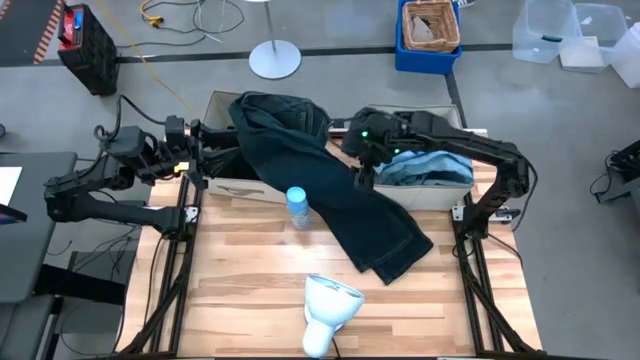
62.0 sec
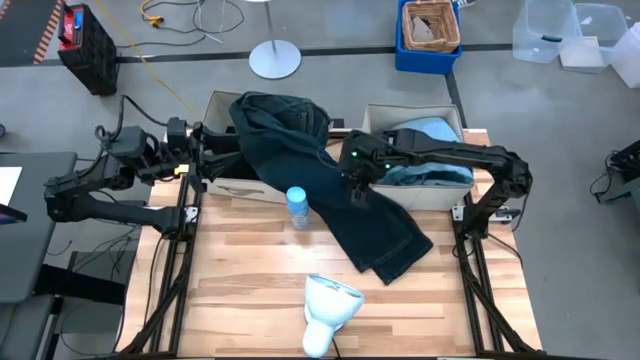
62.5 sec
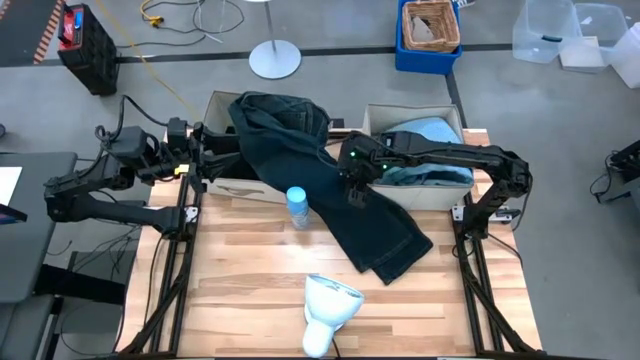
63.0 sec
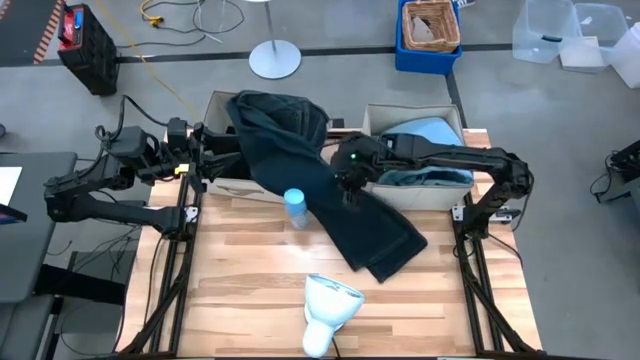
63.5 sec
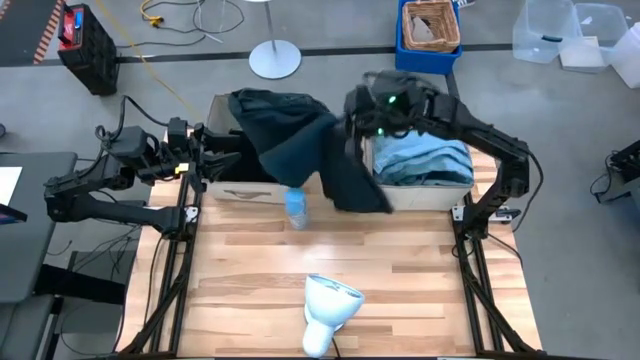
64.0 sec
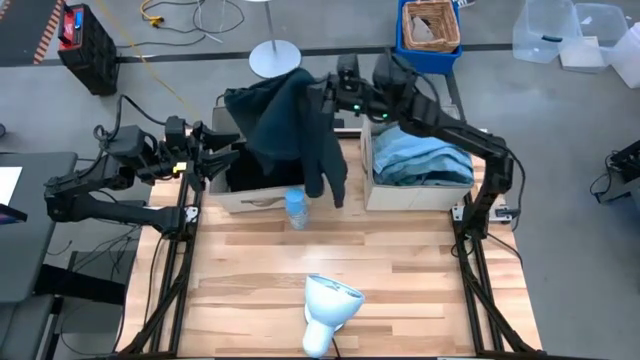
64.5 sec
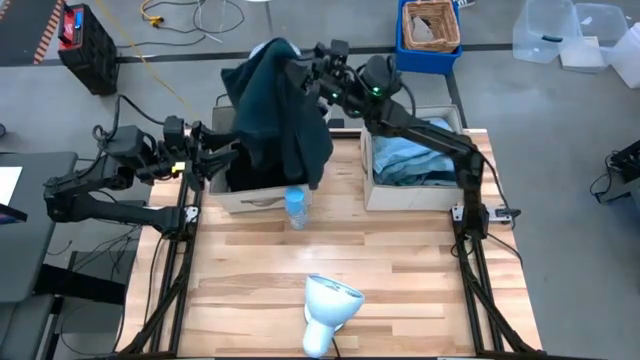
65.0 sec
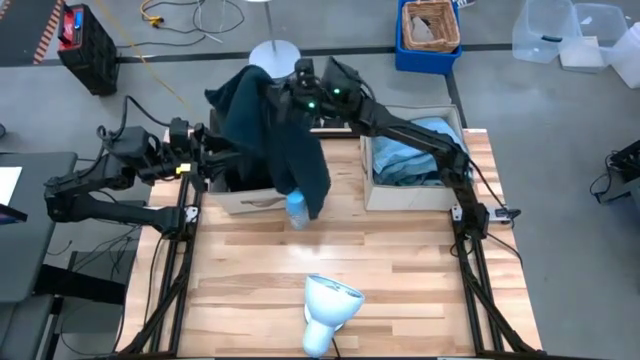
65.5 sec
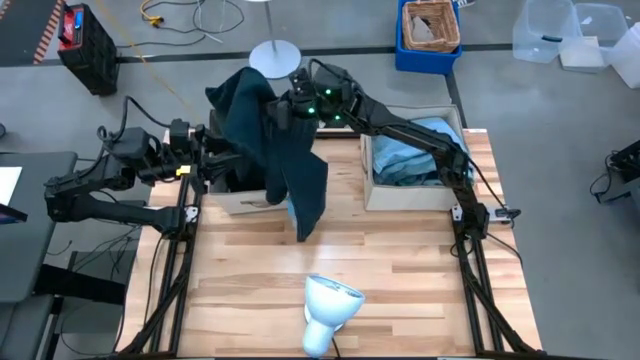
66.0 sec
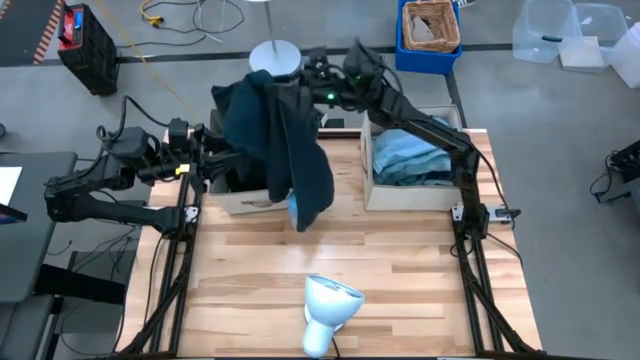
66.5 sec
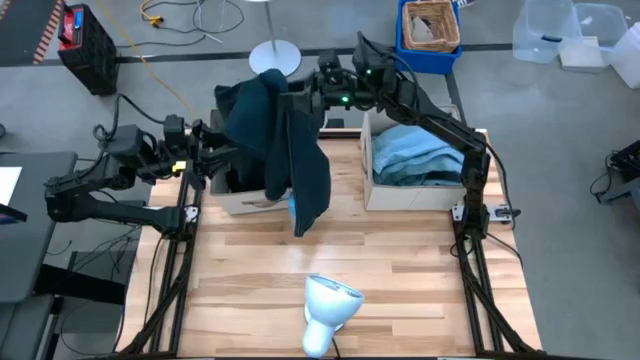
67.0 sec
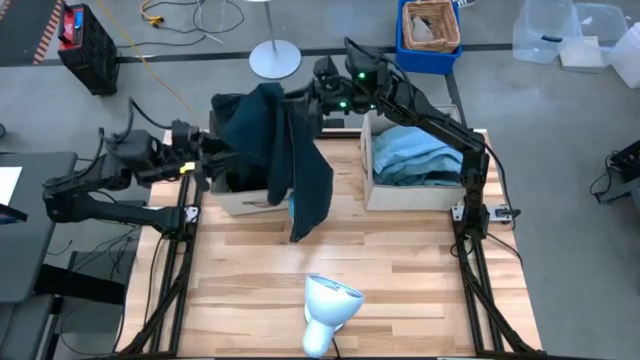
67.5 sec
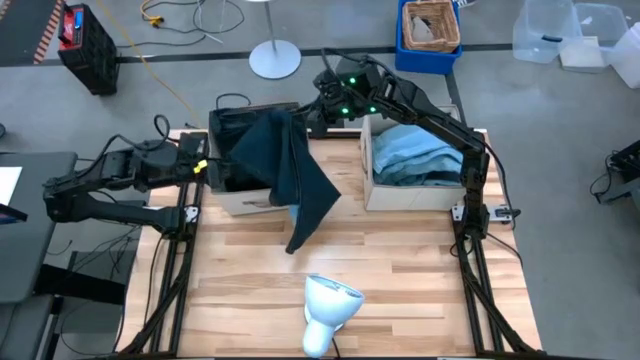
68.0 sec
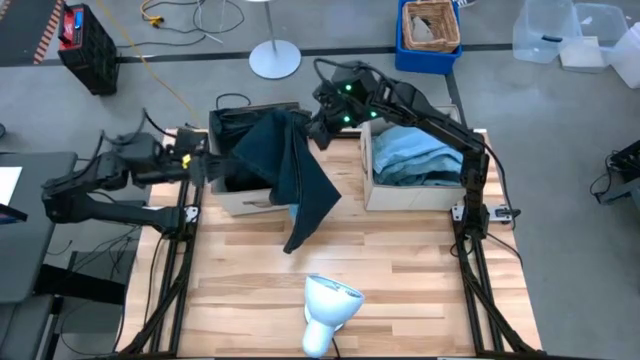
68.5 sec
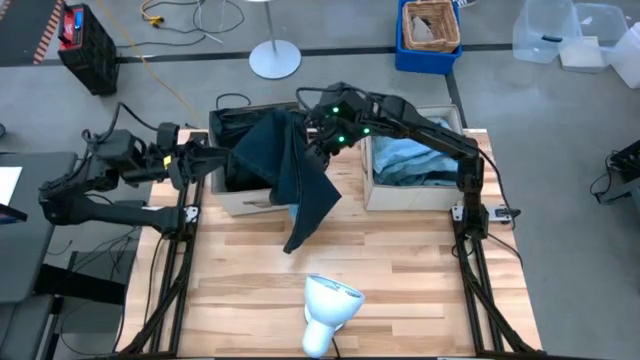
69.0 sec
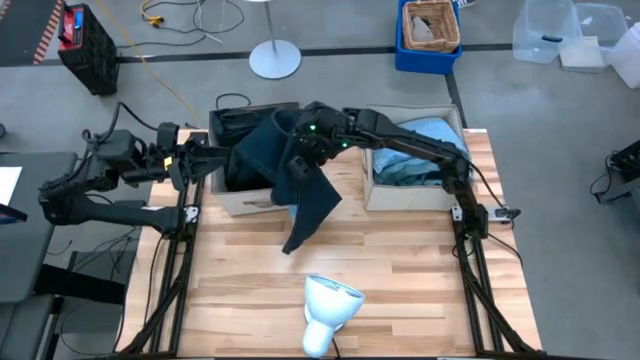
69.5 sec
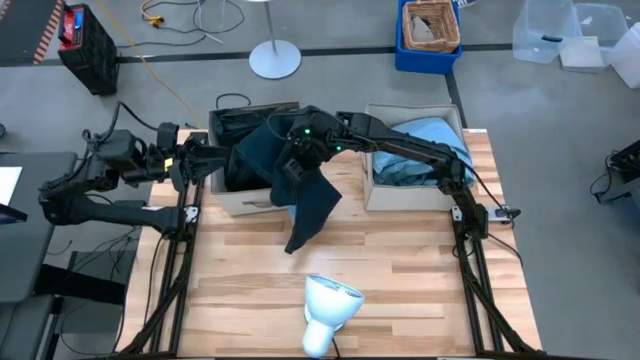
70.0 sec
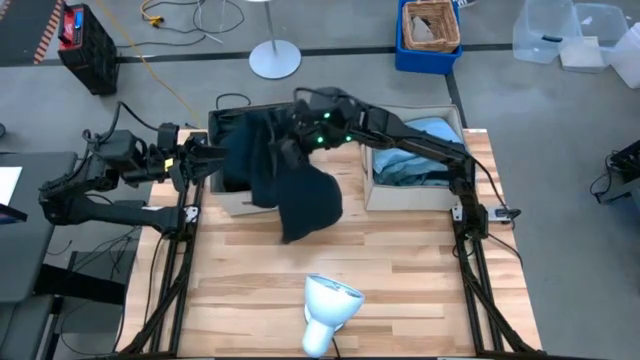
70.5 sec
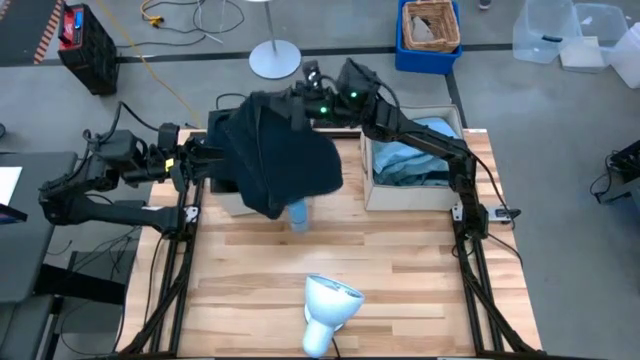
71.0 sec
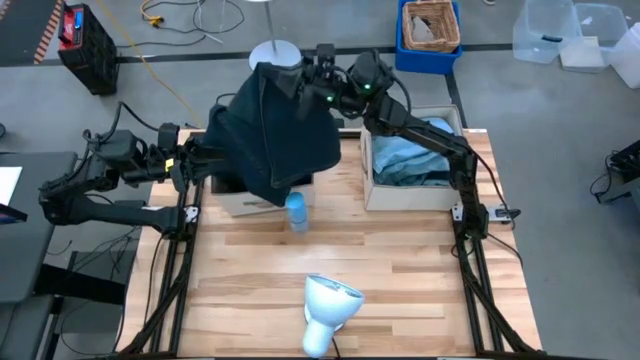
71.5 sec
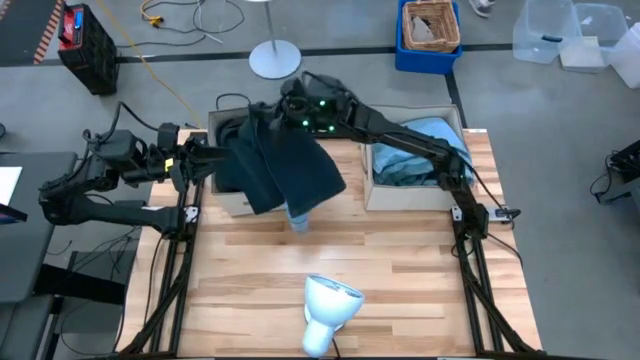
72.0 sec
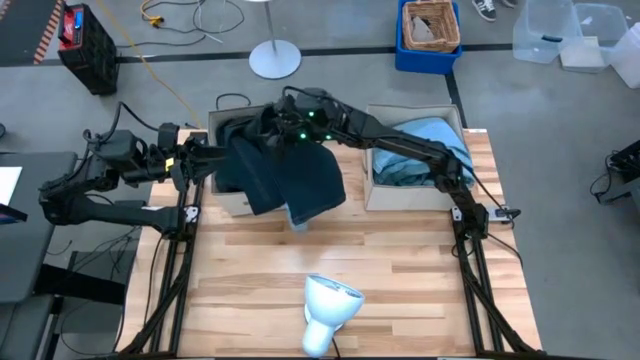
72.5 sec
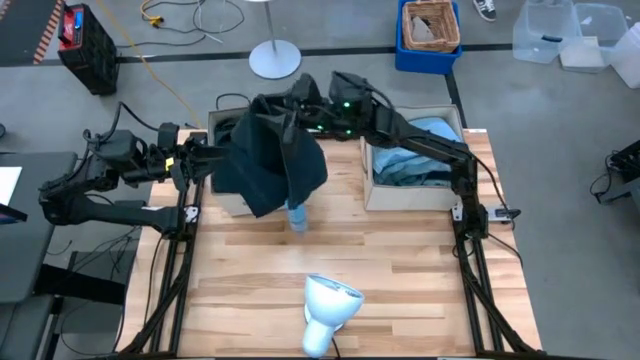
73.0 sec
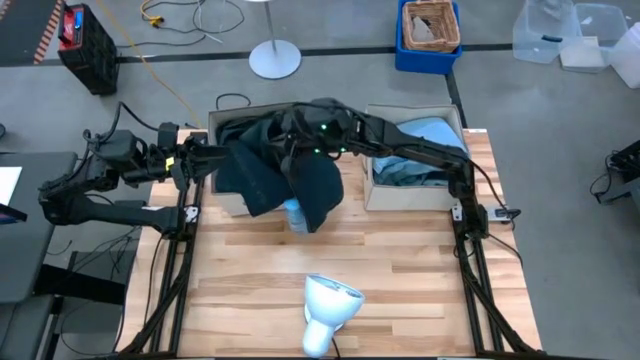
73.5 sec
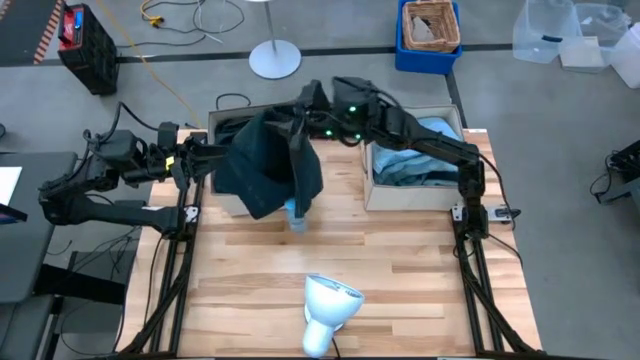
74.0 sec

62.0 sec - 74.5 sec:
Task: Sort clothes
Put the dark blue pants into the left laundry organizer

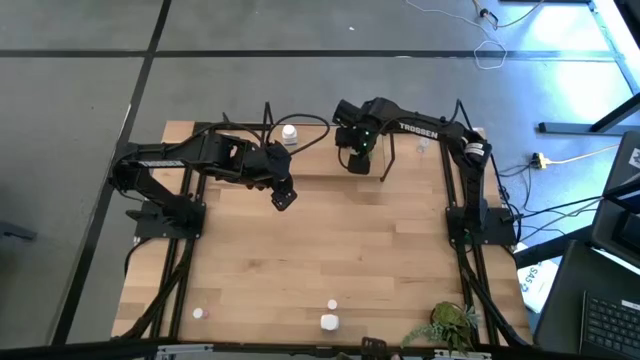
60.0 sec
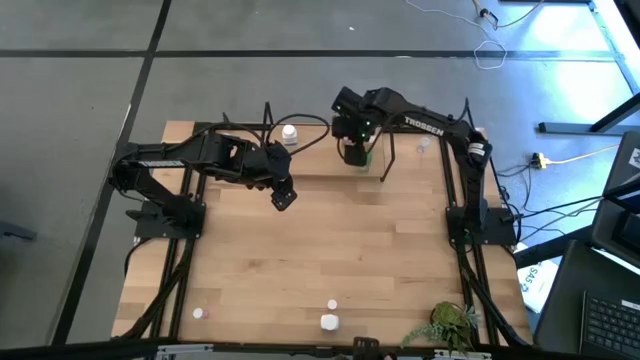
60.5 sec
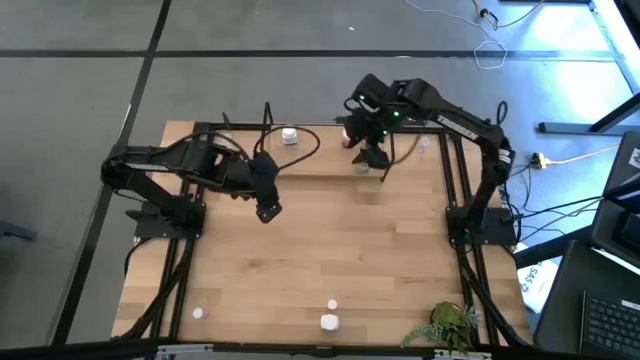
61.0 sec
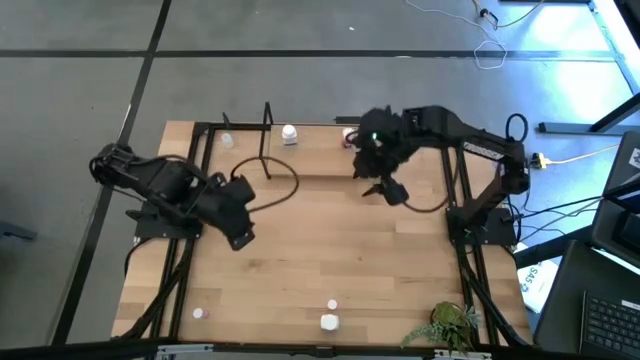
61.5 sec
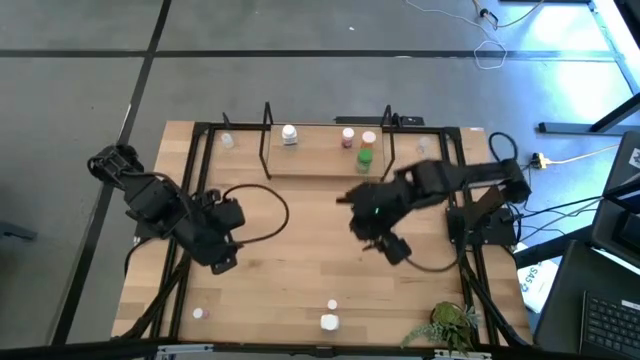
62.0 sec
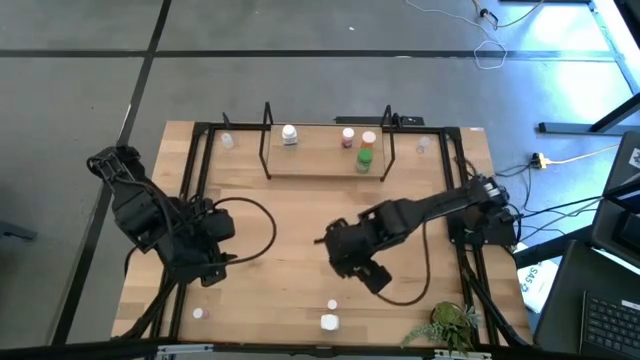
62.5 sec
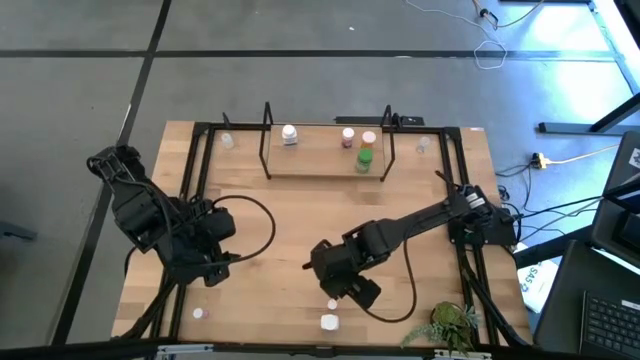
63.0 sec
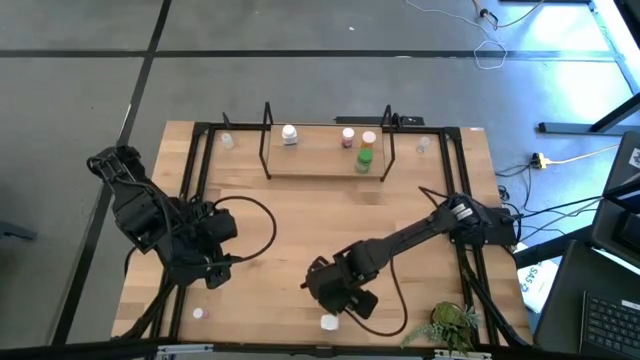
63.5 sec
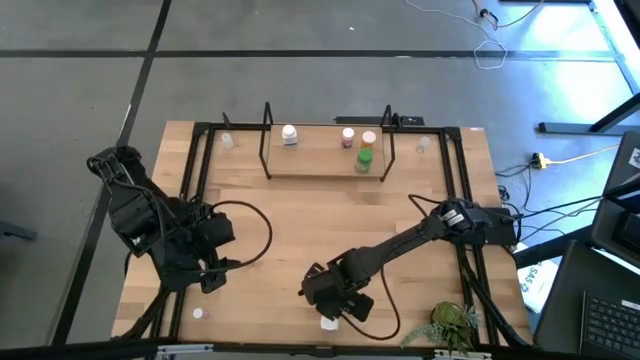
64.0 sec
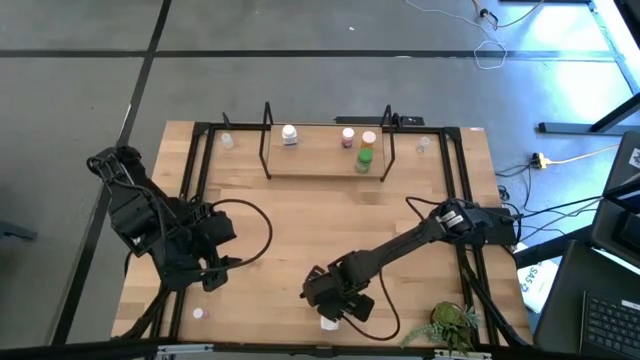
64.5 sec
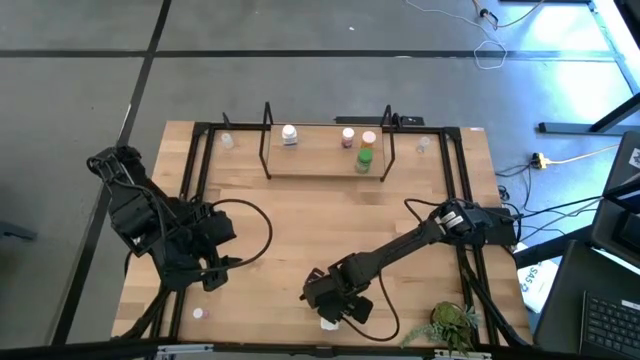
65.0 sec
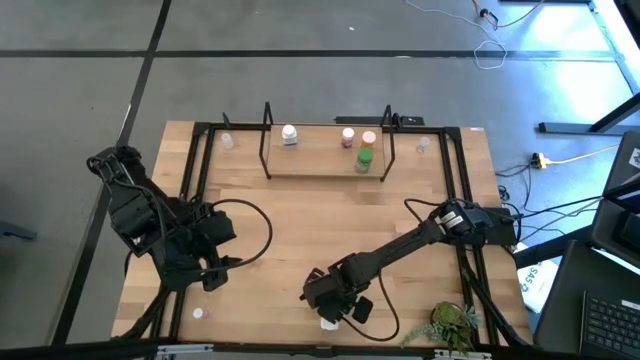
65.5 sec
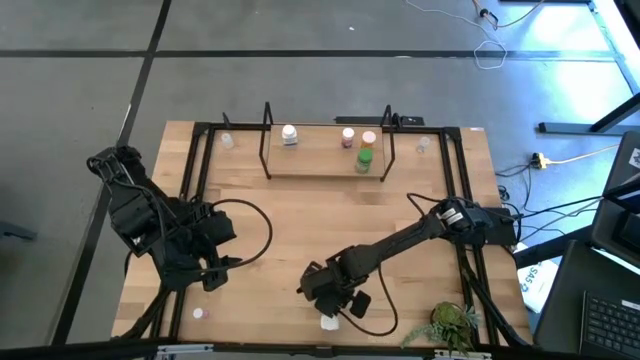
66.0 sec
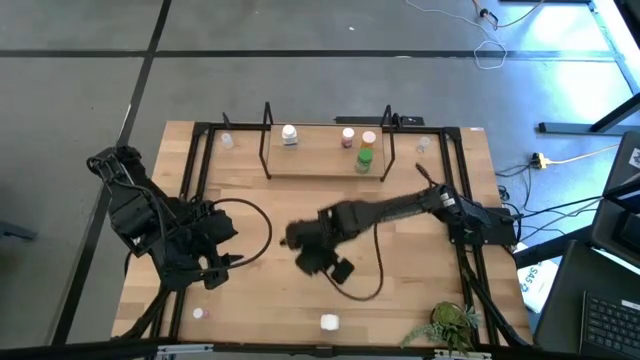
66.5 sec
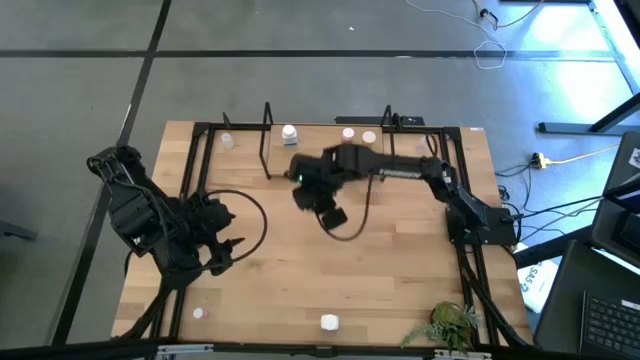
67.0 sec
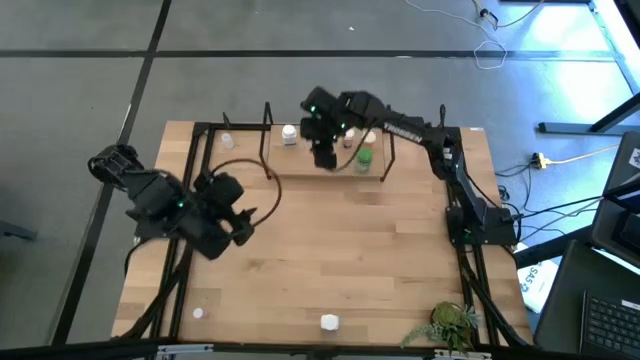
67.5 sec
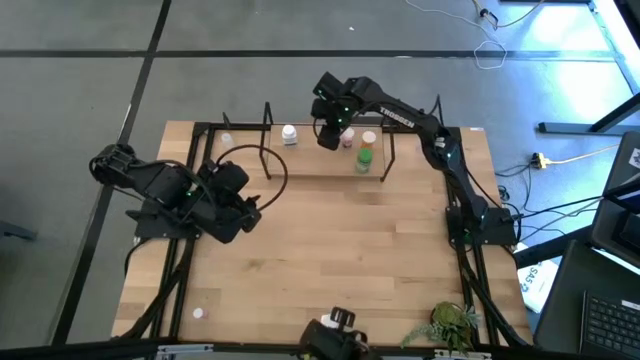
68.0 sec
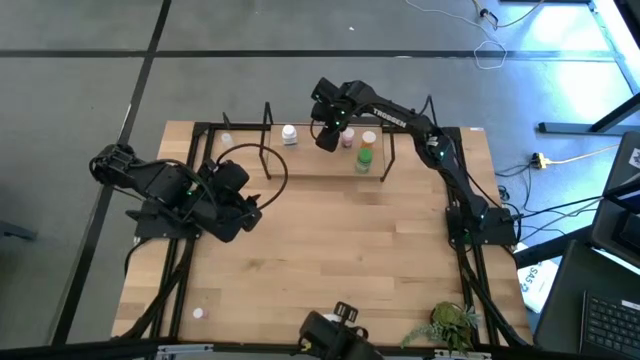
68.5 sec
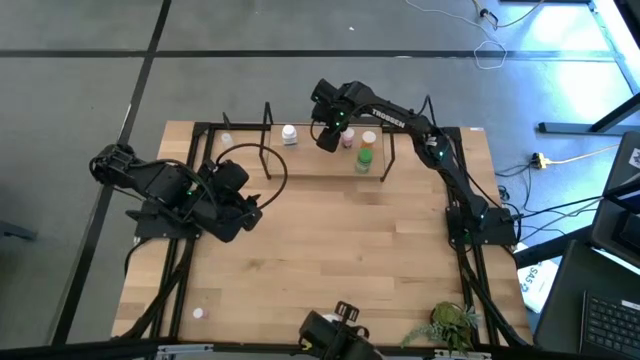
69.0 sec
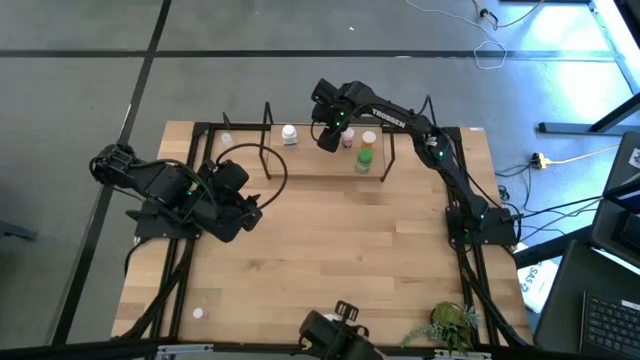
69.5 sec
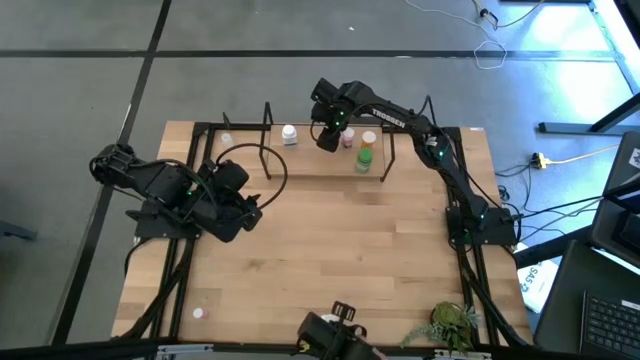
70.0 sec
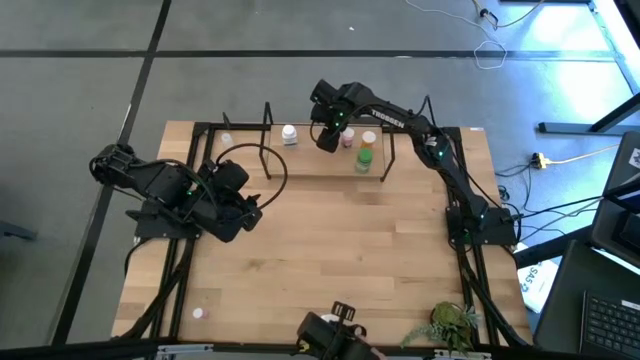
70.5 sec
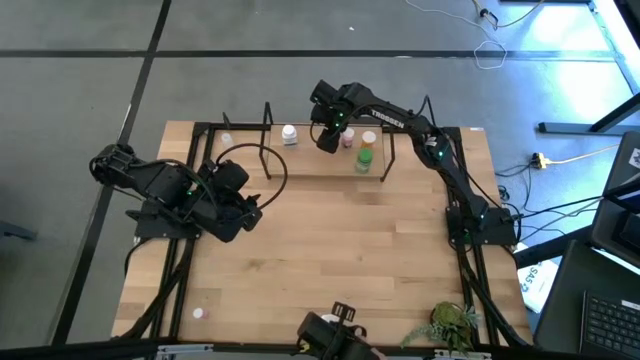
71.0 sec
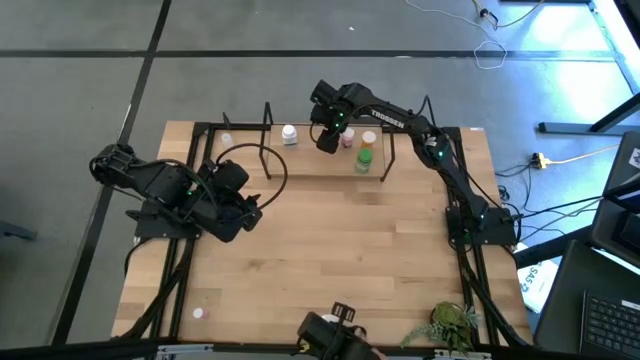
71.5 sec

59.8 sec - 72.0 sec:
Task: Pick and place medicine bottles onto shelf by color
Put the right pink pill bottle on the shelf
